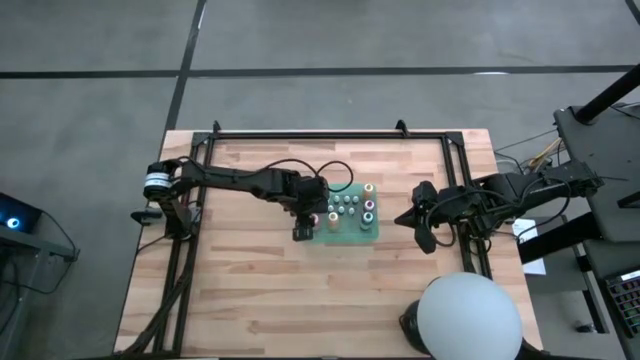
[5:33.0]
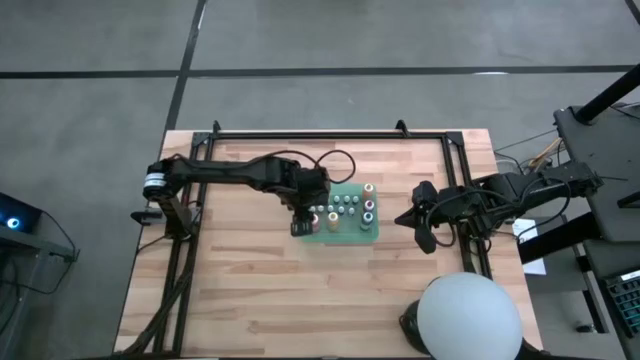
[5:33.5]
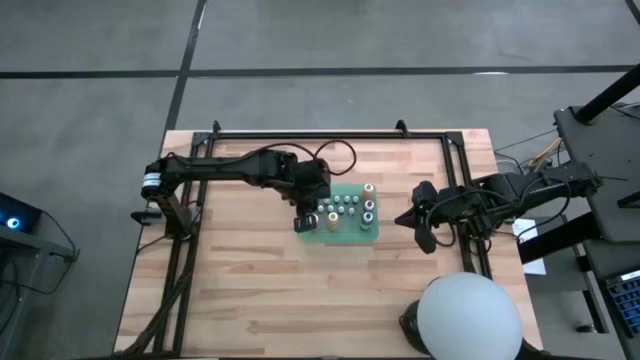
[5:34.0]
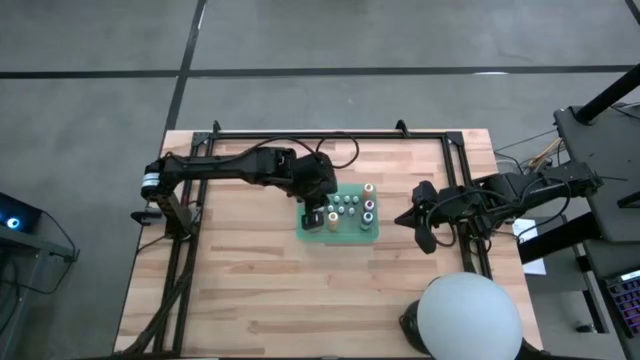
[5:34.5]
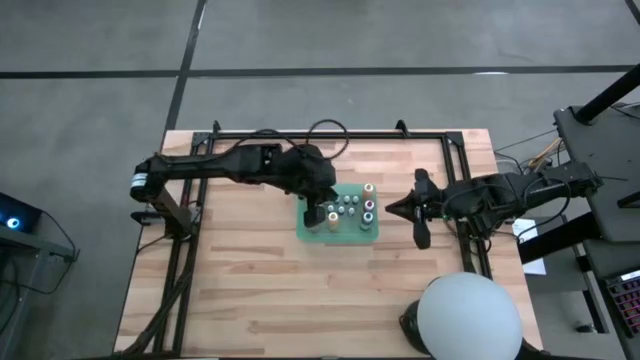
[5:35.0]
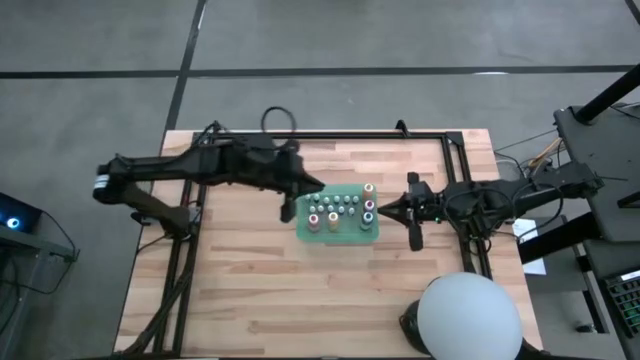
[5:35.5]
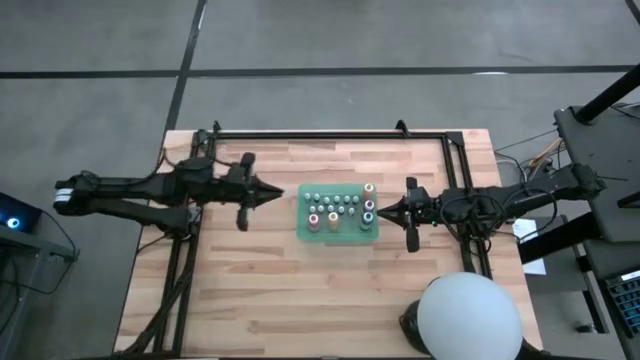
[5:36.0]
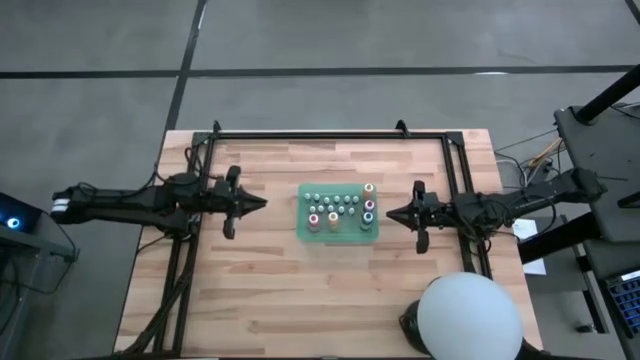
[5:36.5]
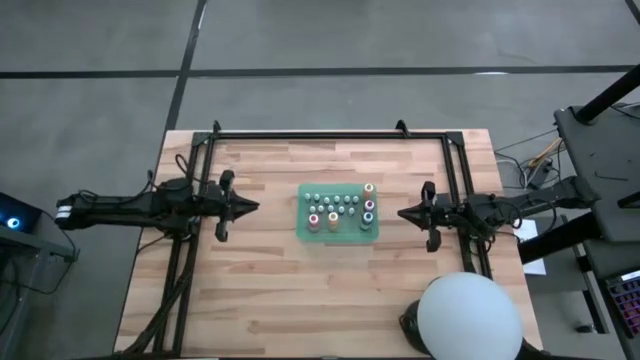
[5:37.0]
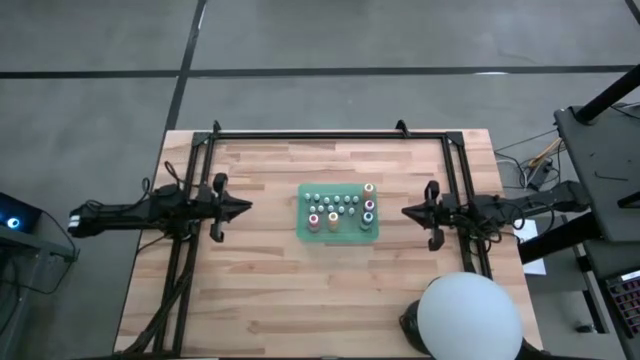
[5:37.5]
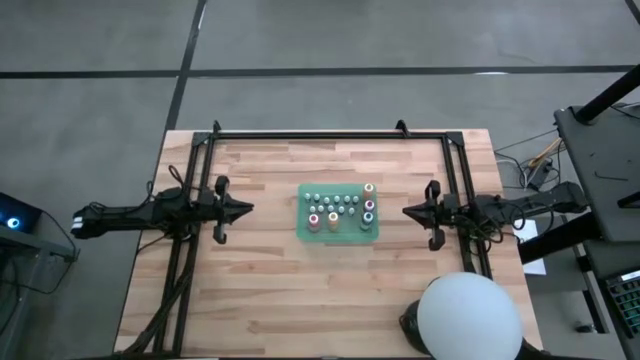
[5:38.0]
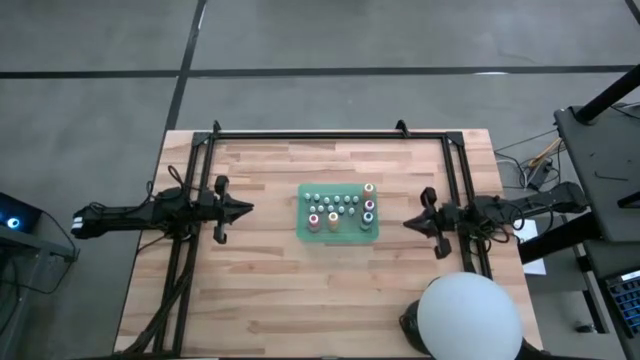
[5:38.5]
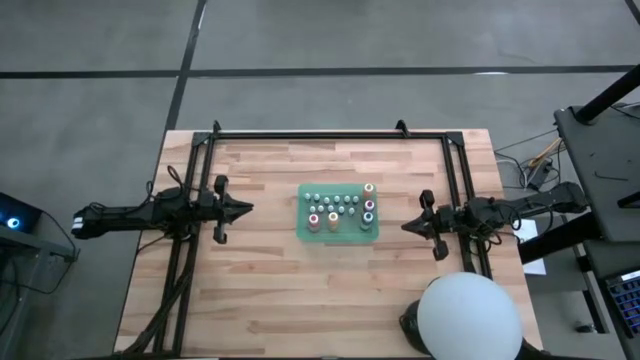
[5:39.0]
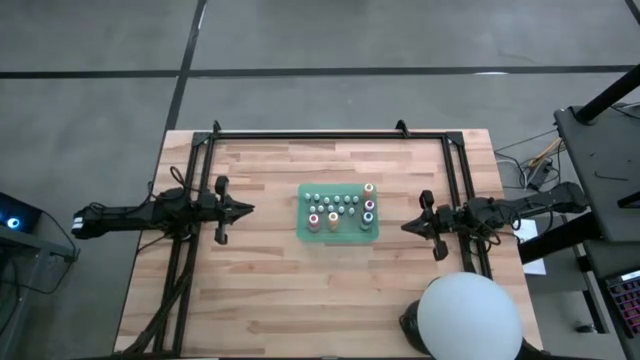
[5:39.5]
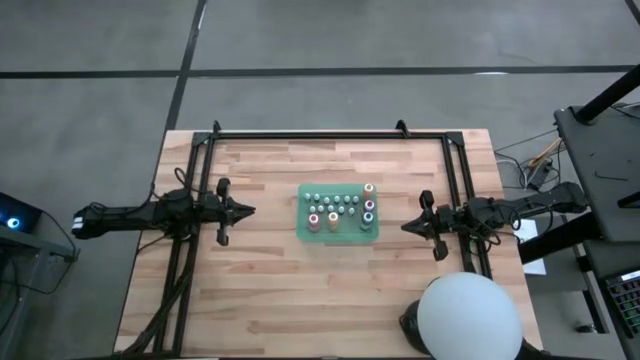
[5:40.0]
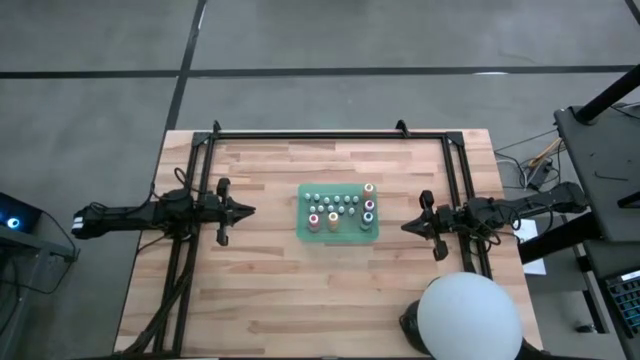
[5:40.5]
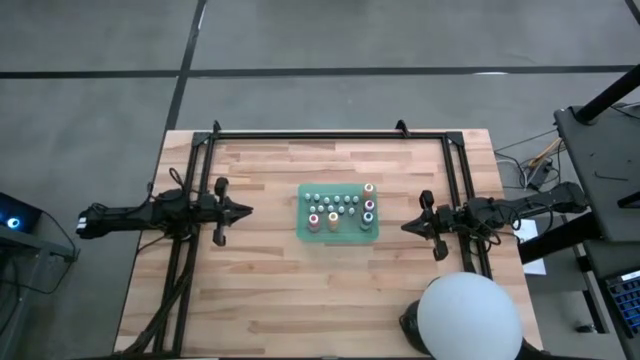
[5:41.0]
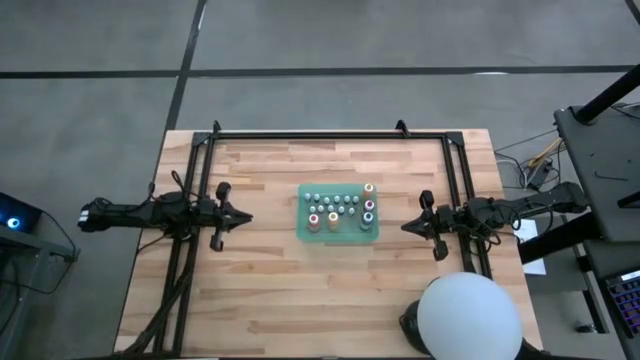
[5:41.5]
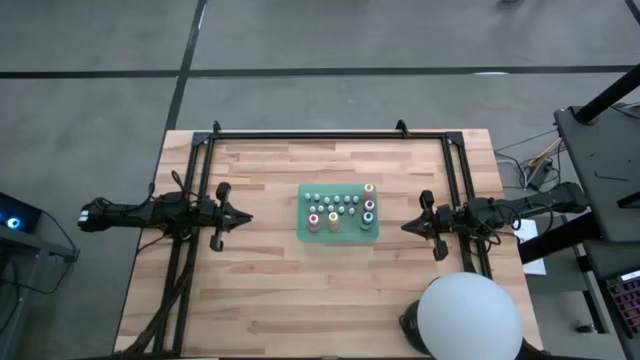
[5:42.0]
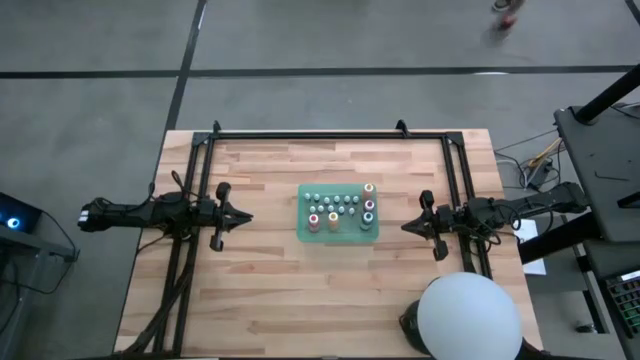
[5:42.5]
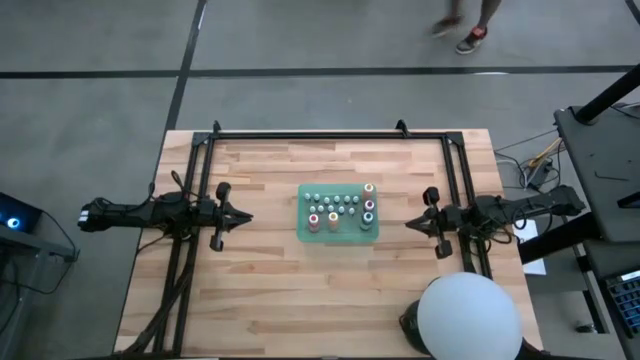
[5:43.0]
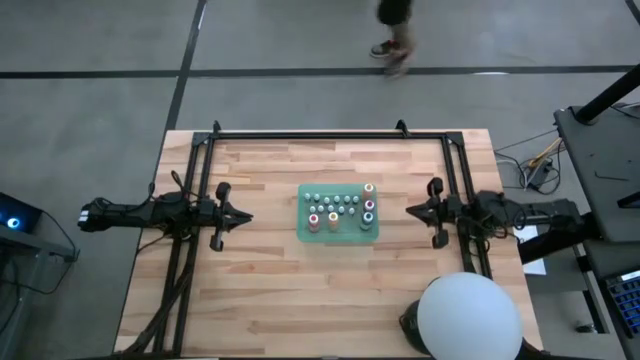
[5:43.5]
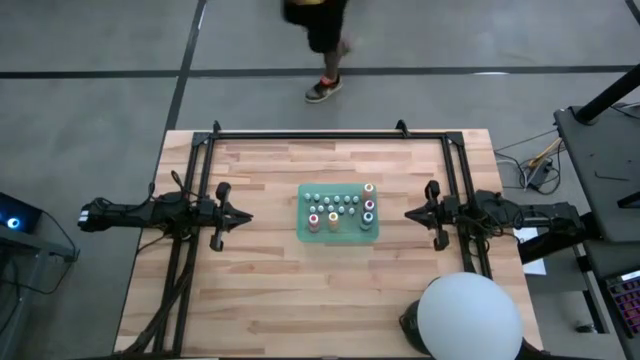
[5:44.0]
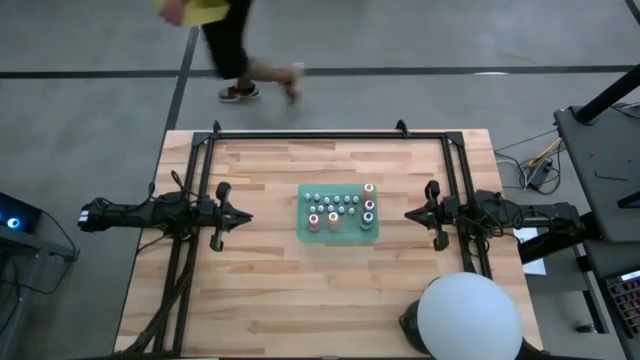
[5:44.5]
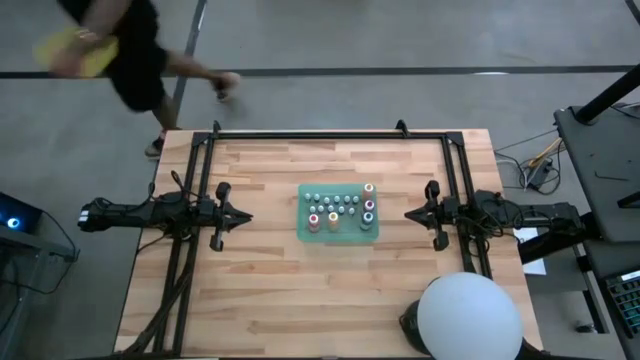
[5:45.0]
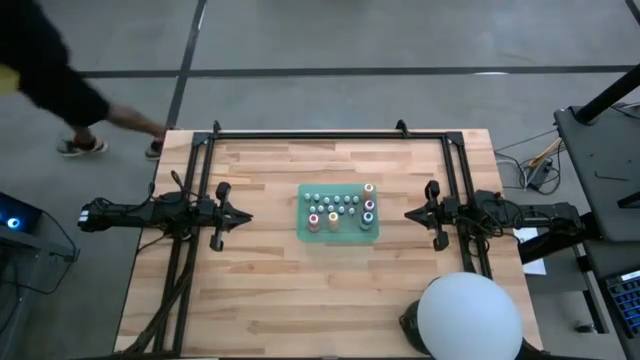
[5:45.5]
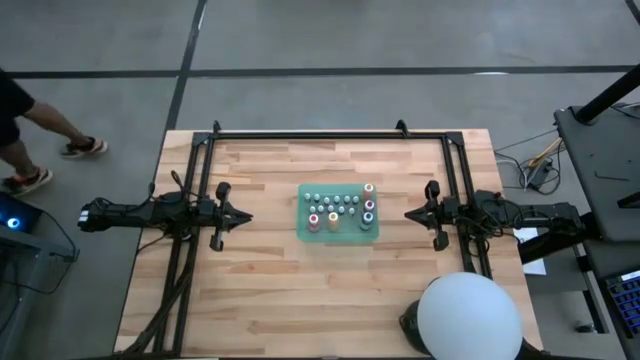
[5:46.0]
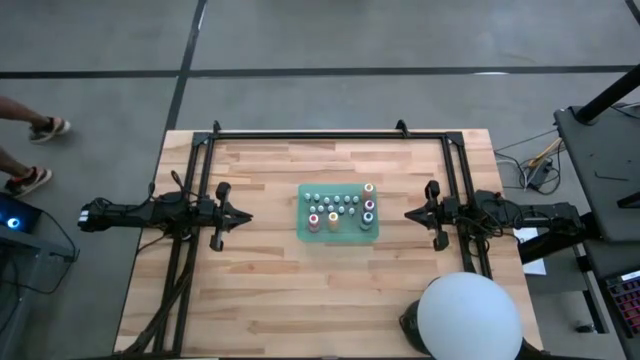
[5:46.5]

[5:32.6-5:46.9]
Task: Pick & Place food coloring
Return to Home Position

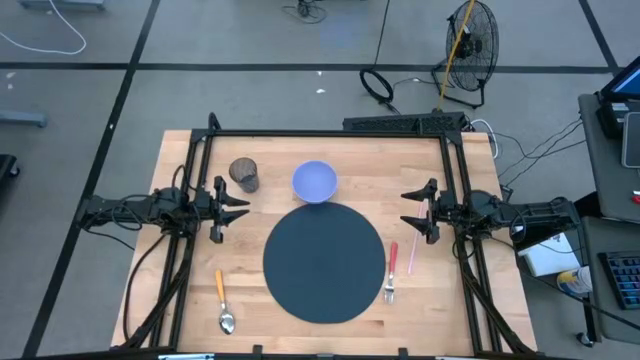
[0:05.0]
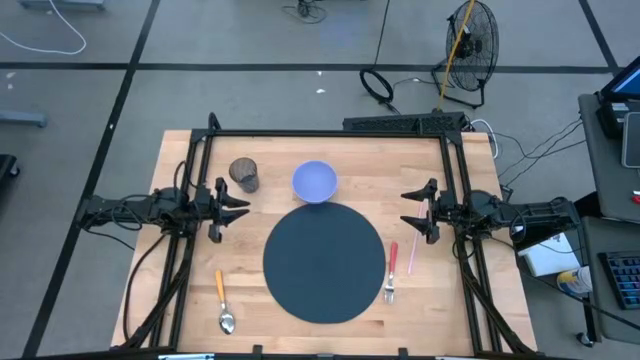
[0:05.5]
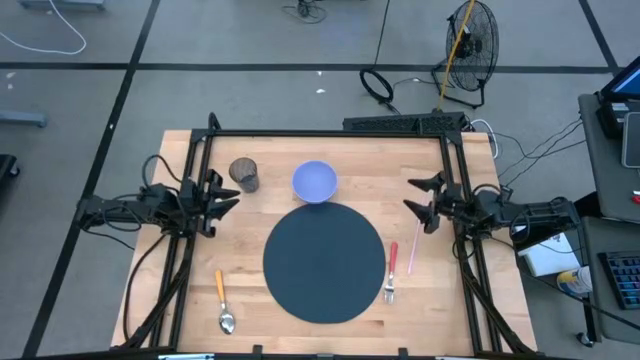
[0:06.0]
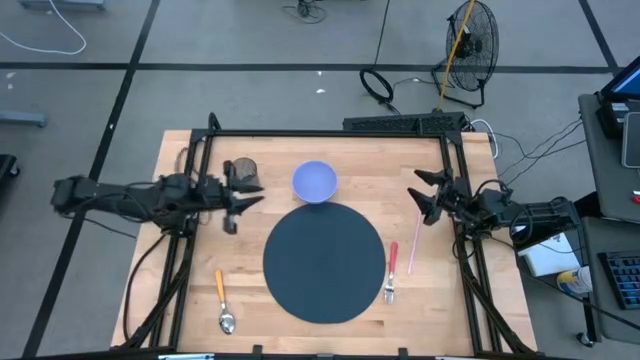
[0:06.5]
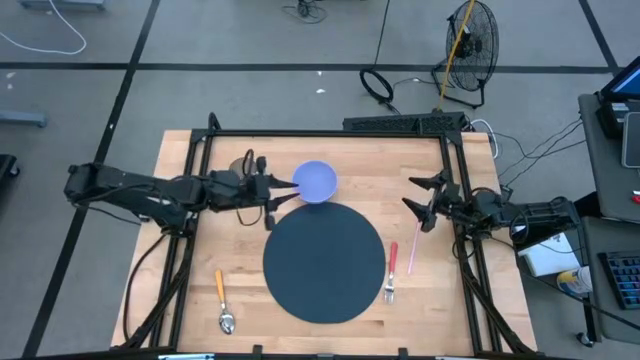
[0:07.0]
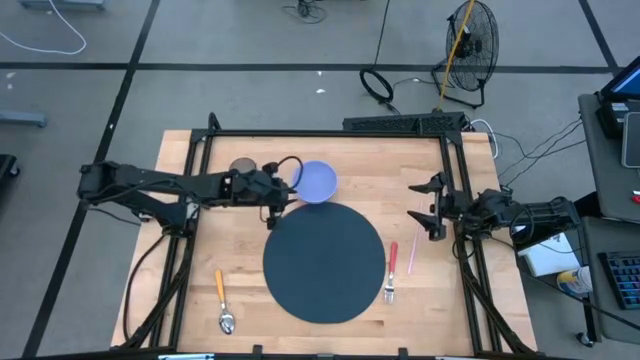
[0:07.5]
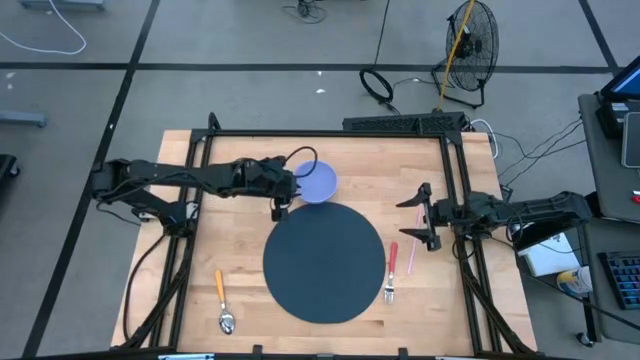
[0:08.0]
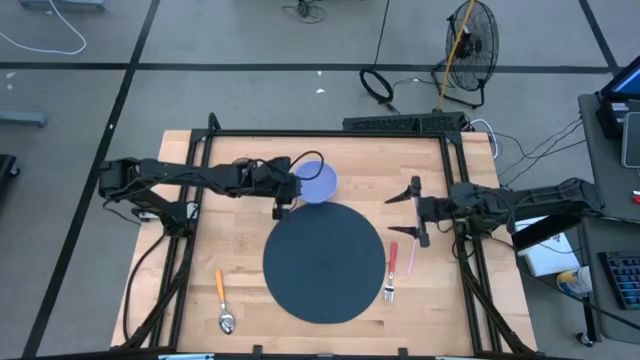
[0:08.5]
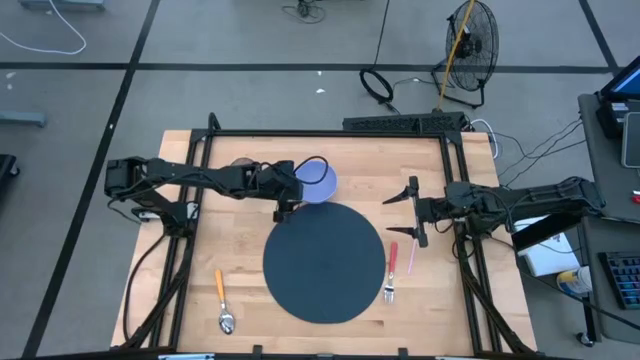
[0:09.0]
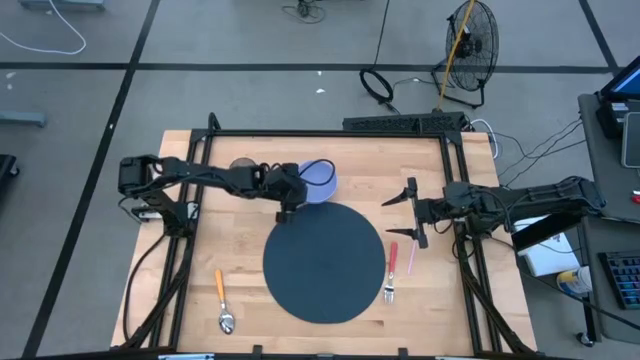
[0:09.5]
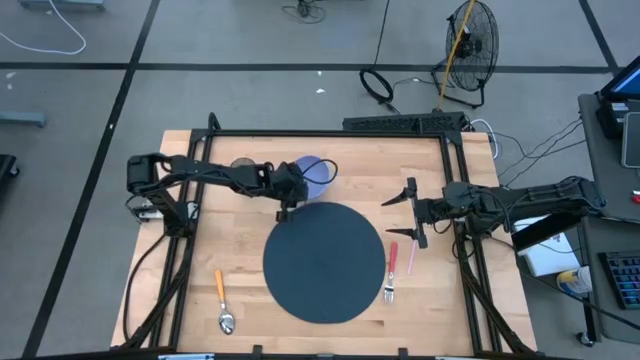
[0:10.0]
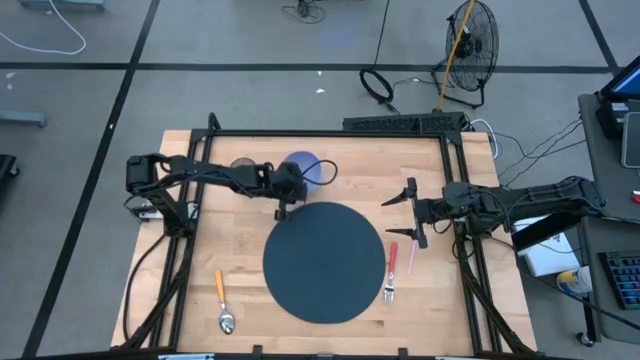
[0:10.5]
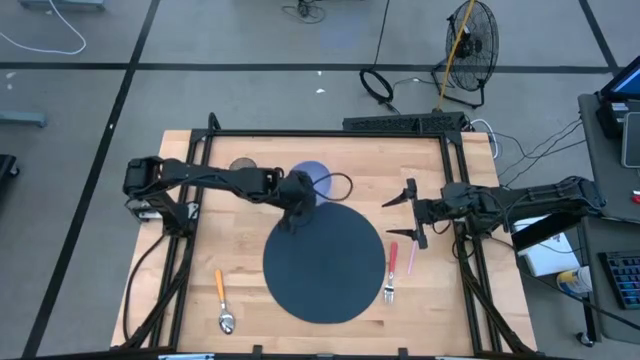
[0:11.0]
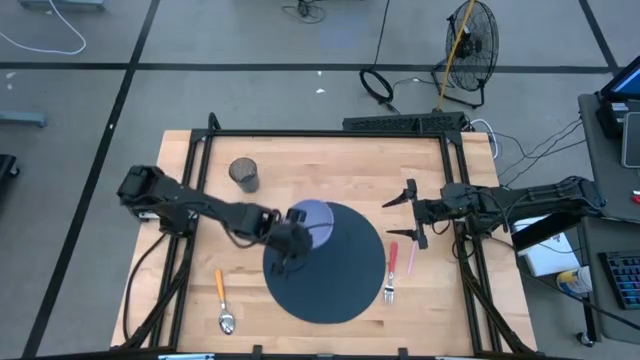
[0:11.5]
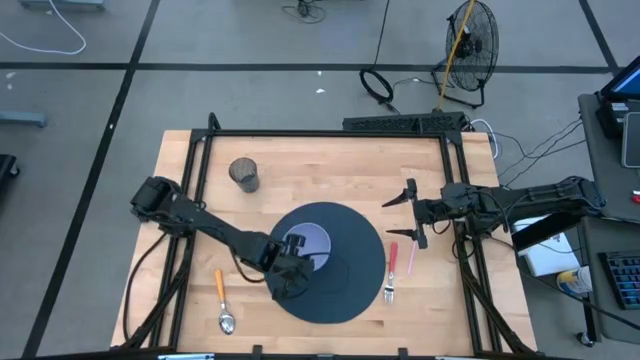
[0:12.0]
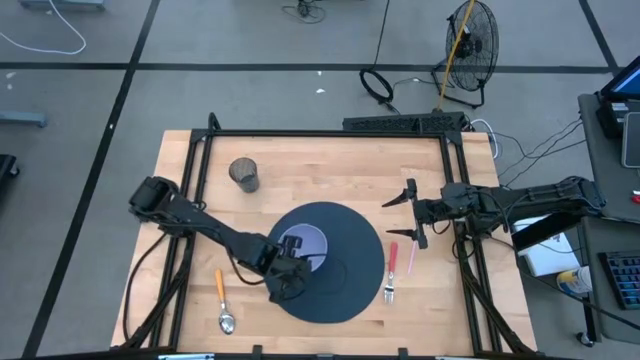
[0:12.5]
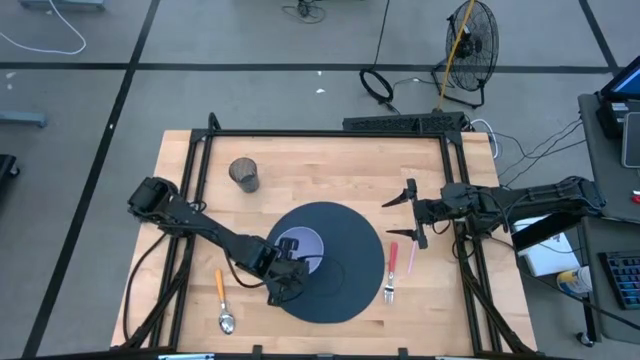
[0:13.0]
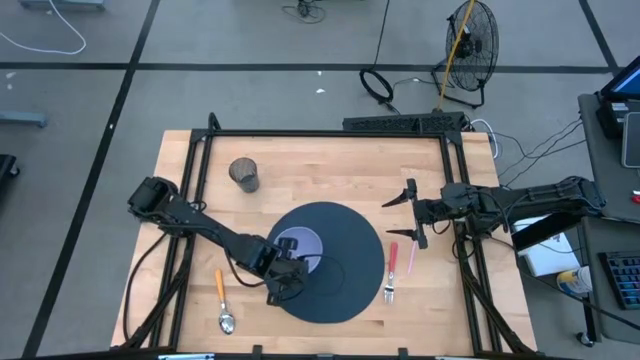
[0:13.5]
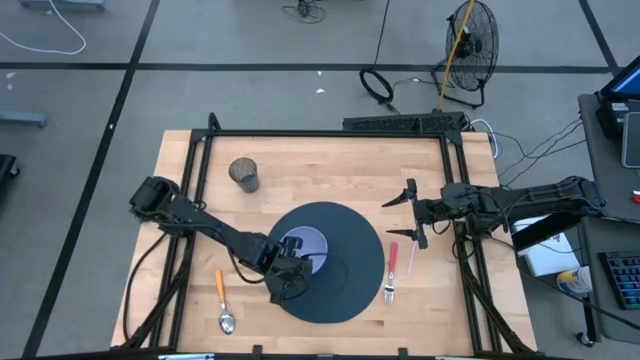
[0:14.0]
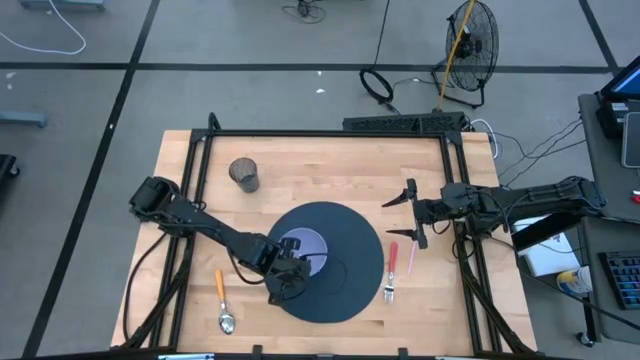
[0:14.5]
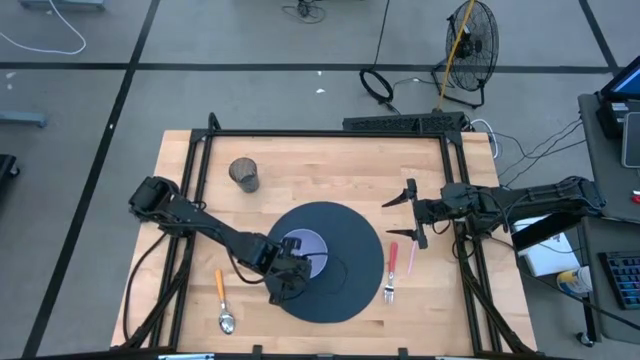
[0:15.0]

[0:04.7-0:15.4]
Task: Pick & Place Utensil
Put the purple bowl on the mat
